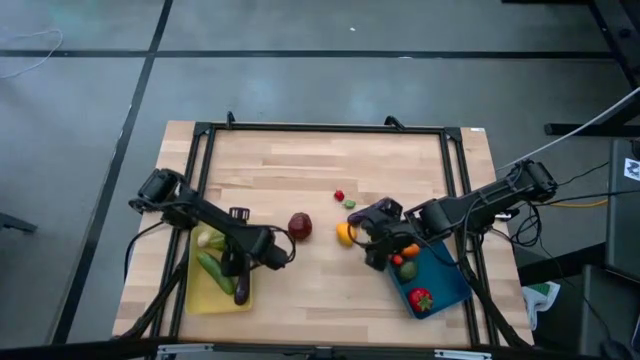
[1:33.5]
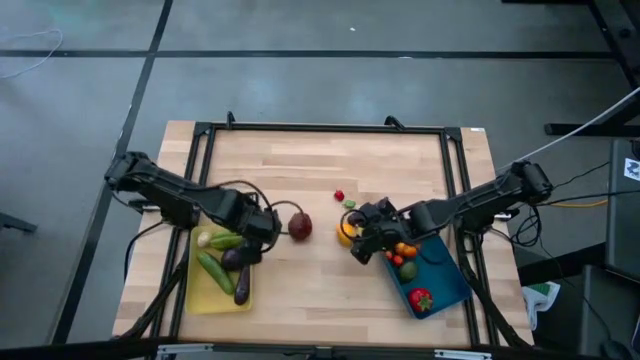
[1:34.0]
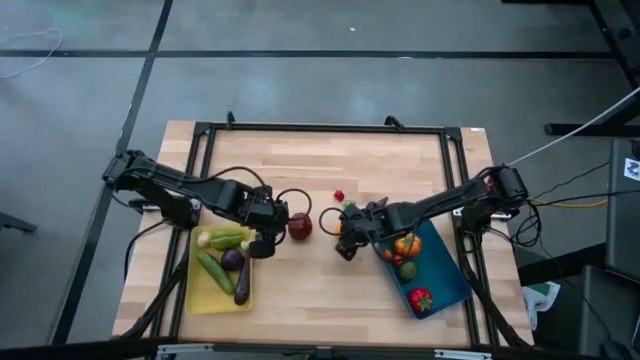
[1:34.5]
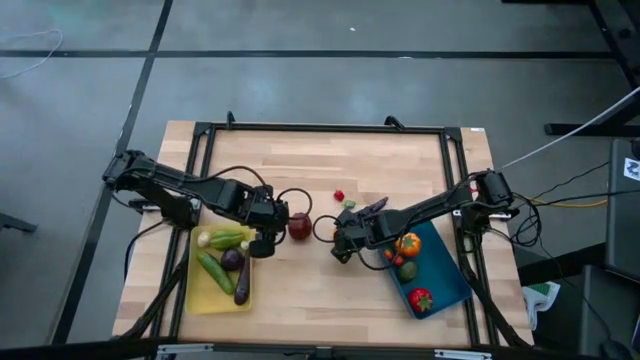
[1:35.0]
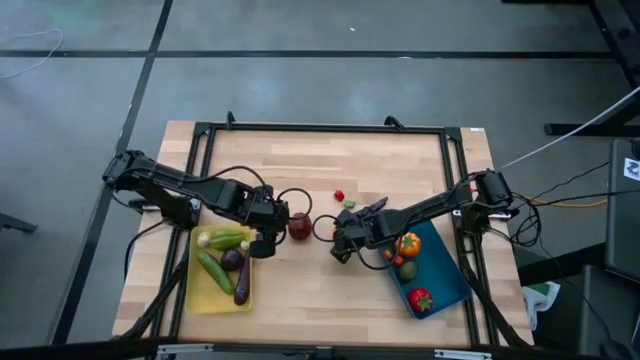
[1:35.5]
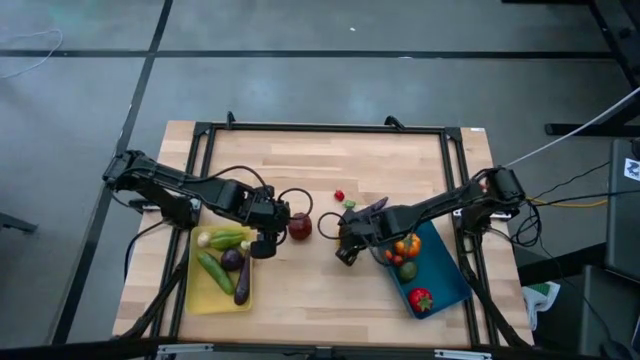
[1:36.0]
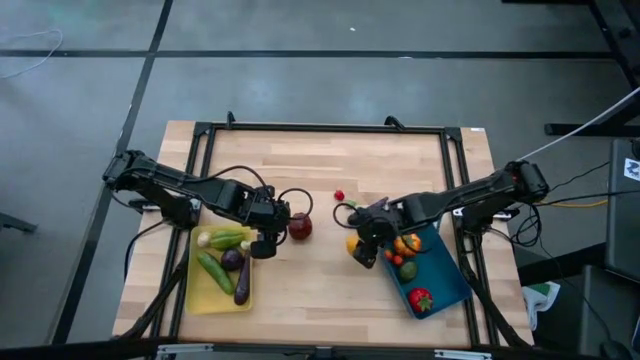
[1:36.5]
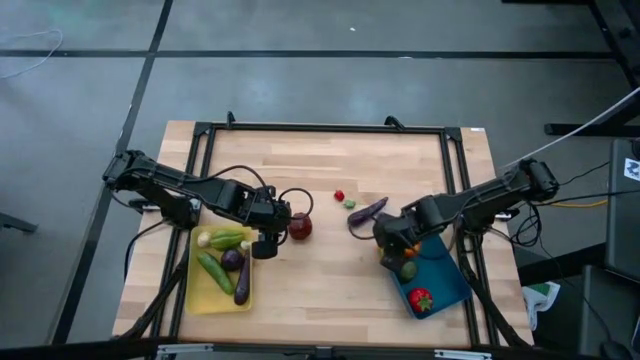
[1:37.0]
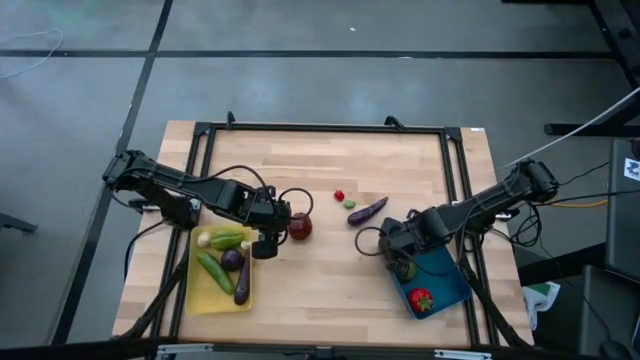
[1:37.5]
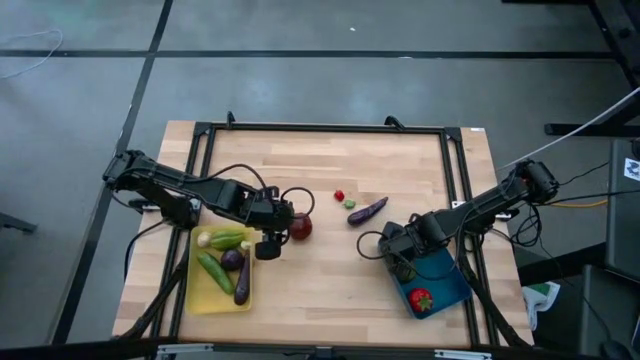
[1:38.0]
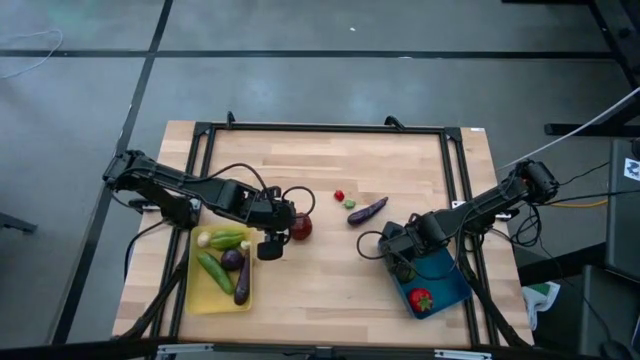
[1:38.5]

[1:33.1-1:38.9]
Task: Sort produce into baskets
Put the yellow lemon into the blue bin

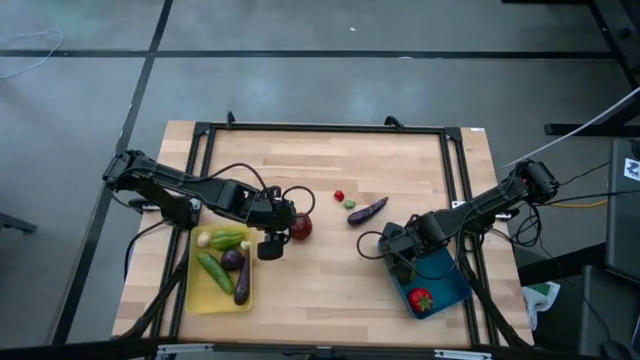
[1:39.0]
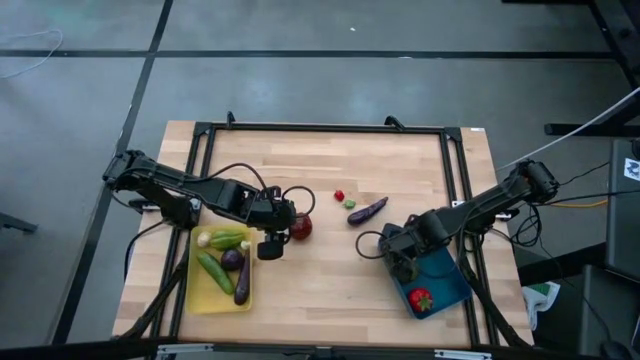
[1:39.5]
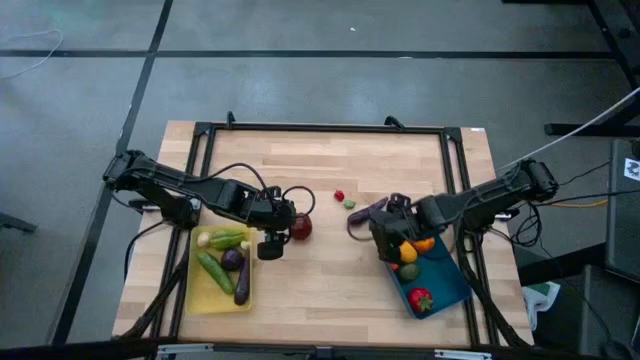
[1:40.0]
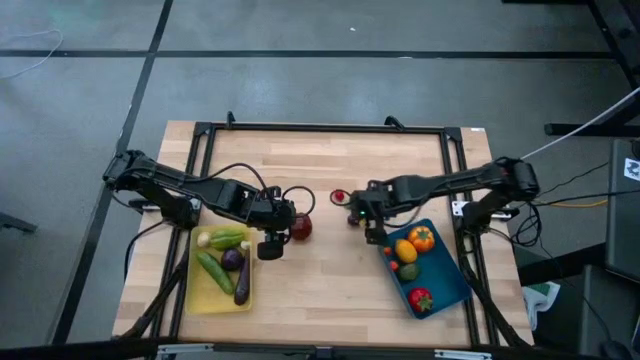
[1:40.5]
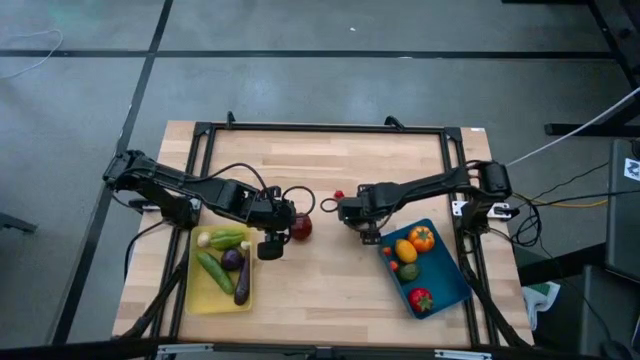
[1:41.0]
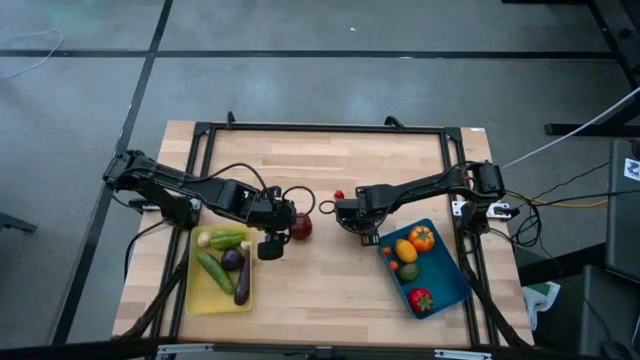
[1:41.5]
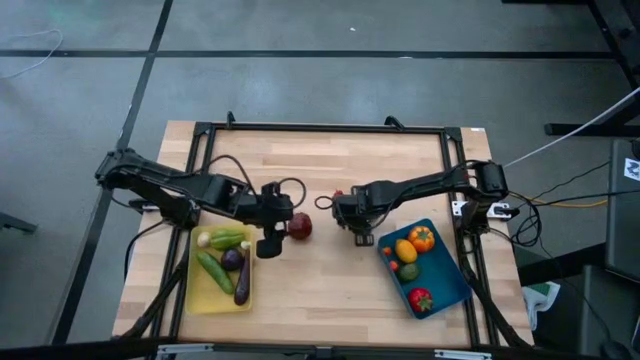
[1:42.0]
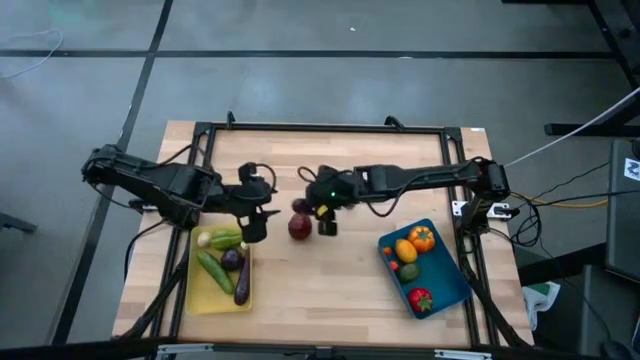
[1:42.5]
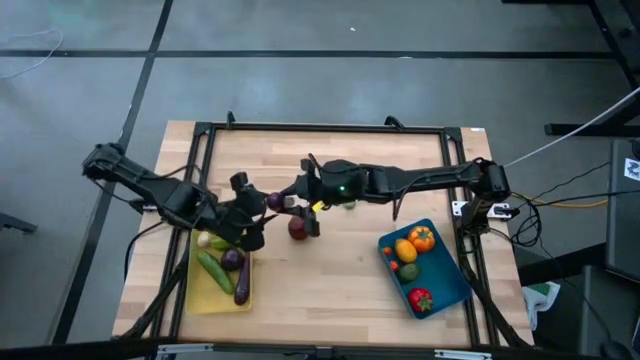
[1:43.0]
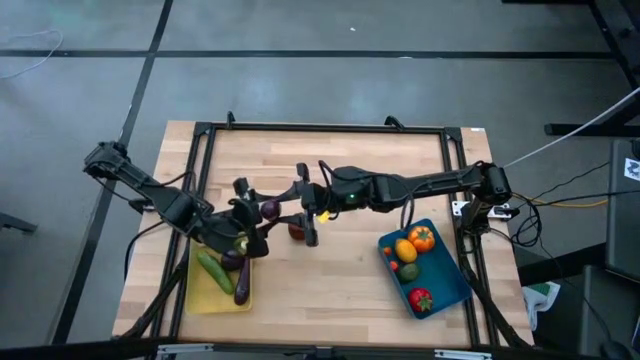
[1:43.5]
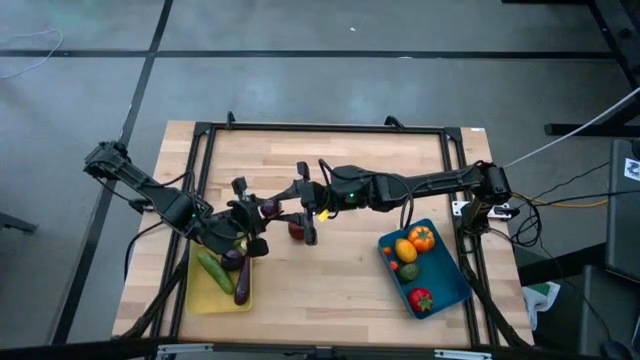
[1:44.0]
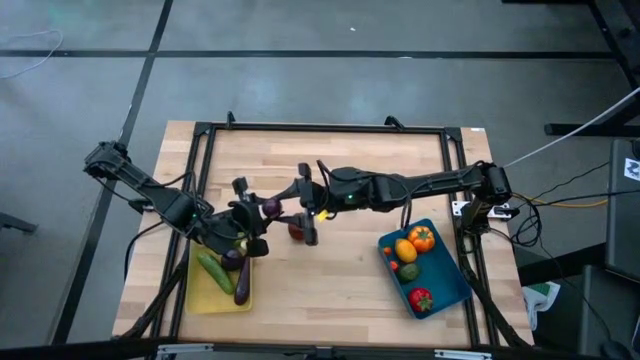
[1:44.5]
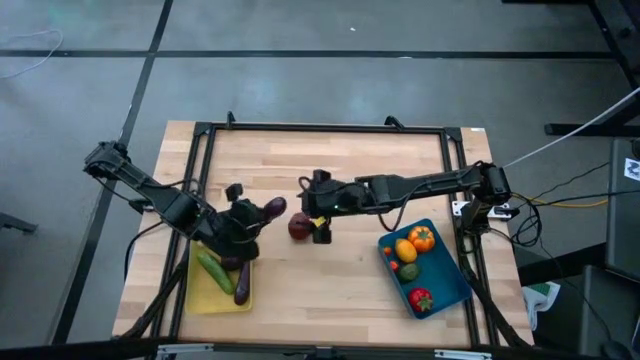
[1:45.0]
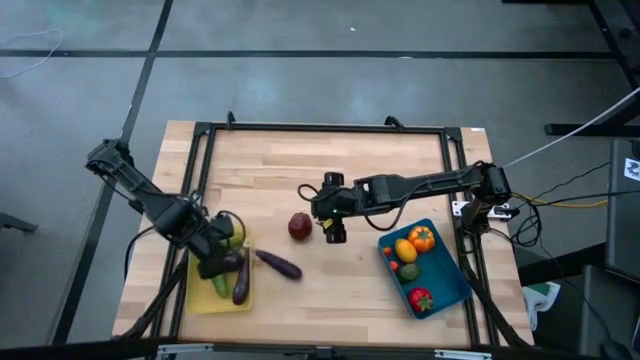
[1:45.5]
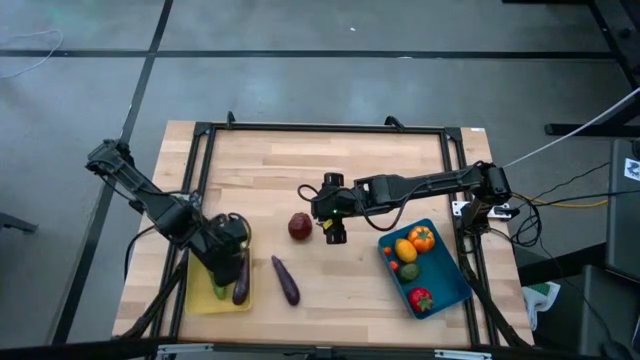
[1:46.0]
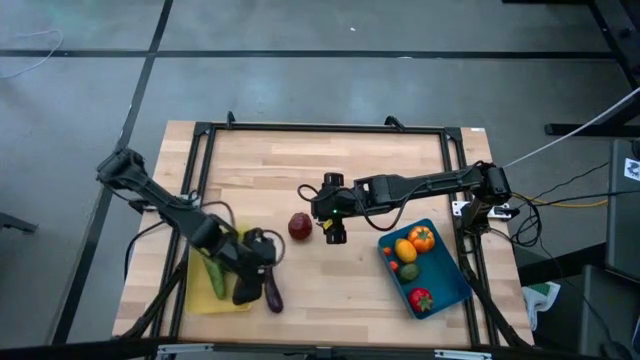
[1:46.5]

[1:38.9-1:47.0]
Put the eggplant into the yellow bin

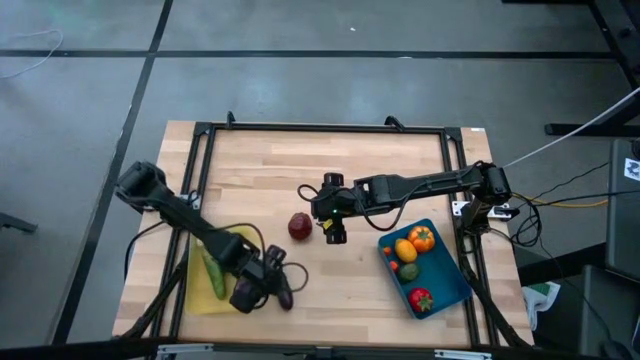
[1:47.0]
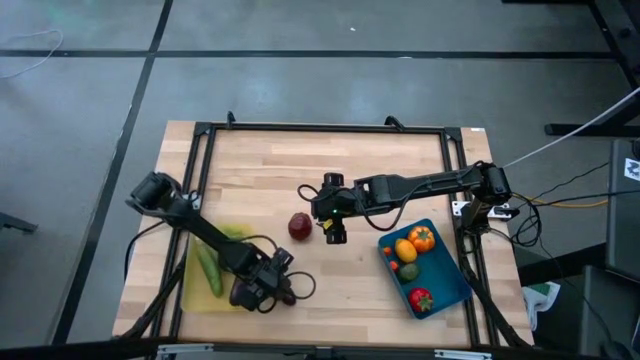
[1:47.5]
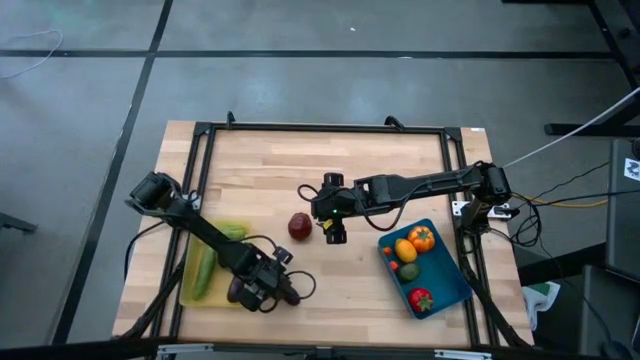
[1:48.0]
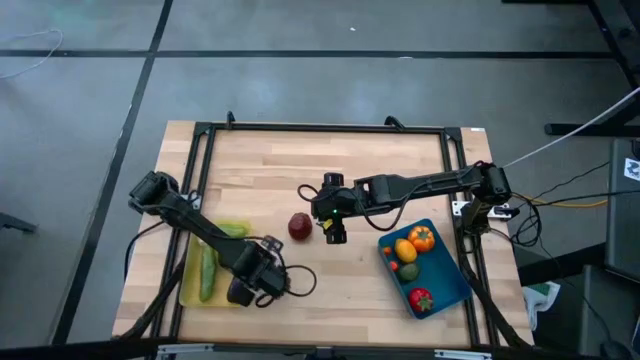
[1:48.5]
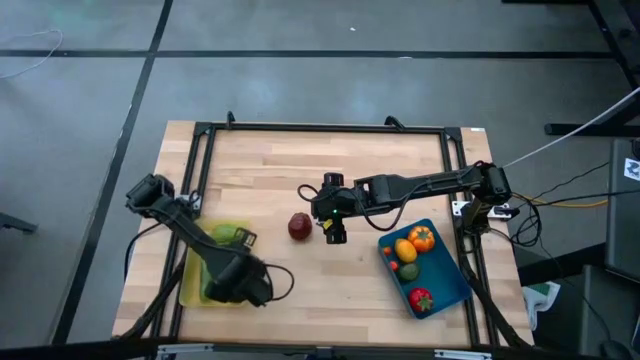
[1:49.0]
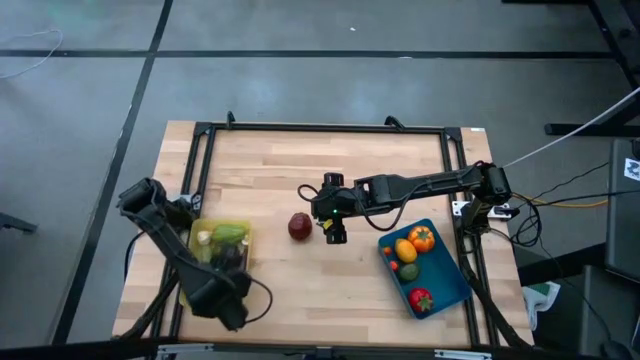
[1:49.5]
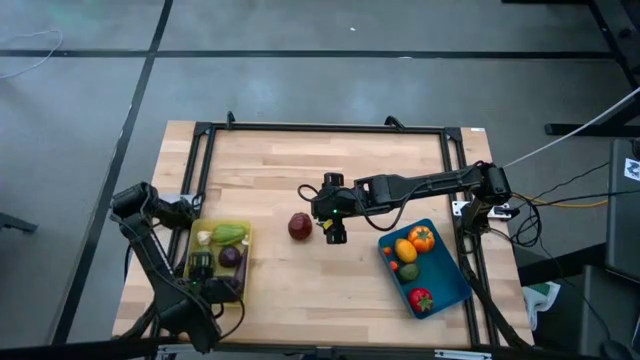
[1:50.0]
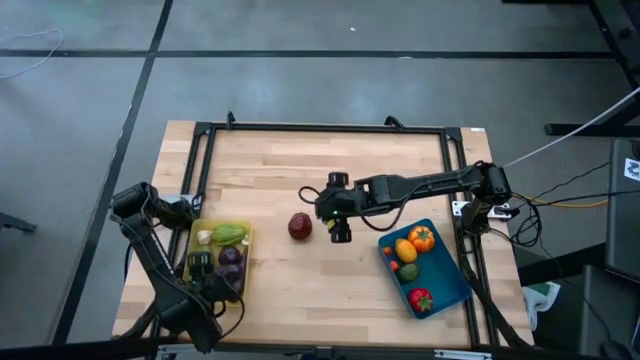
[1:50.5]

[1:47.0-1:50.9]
Put the eggplant into the yellow bin

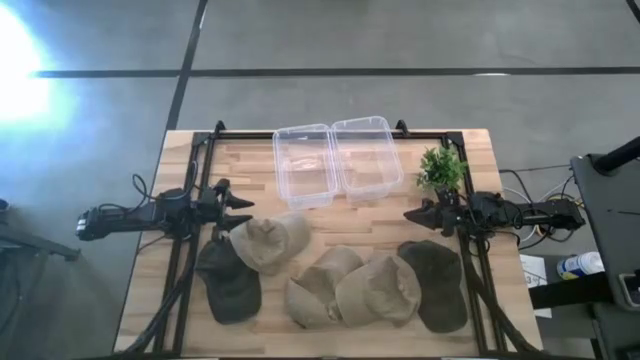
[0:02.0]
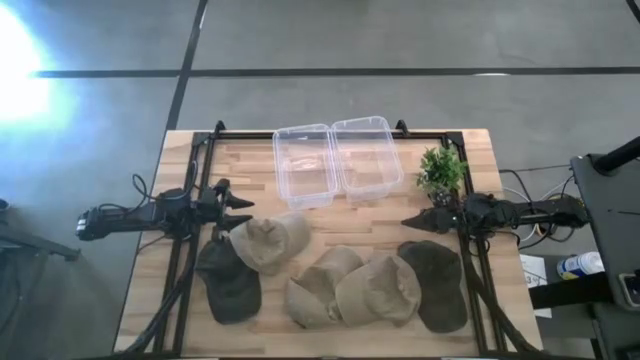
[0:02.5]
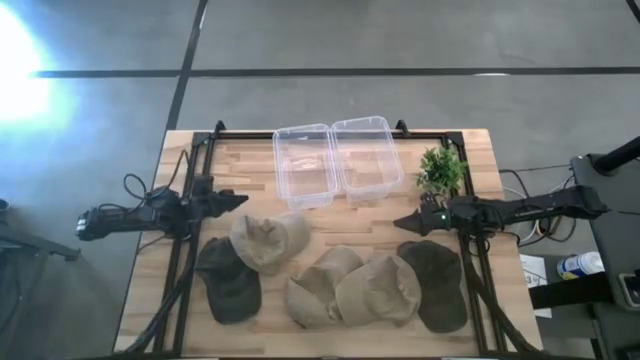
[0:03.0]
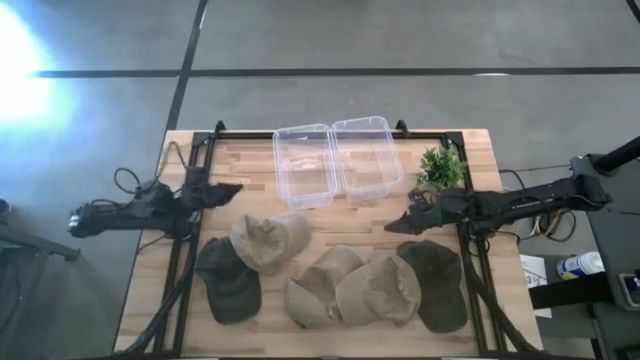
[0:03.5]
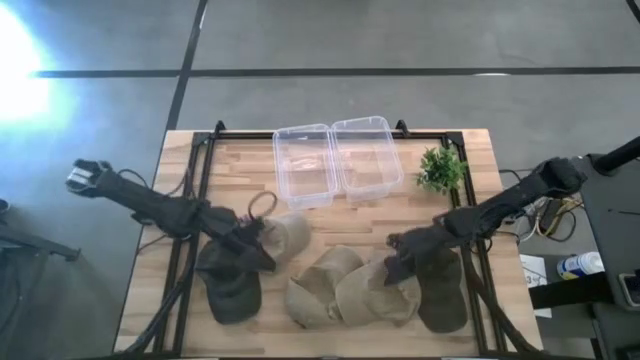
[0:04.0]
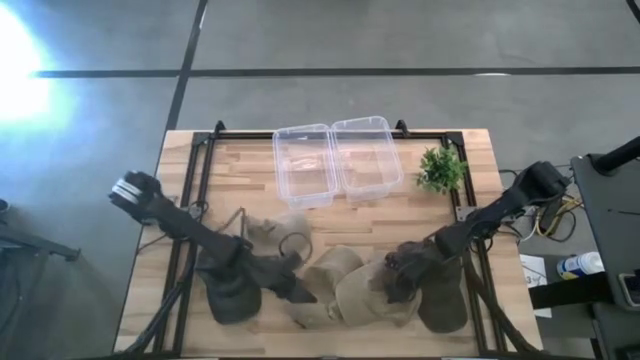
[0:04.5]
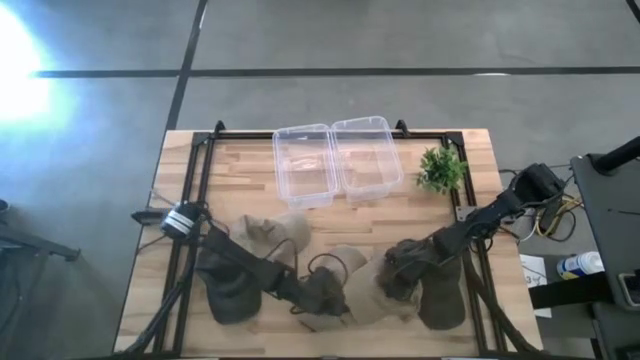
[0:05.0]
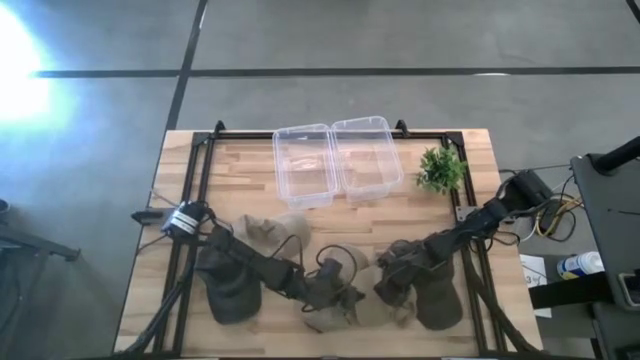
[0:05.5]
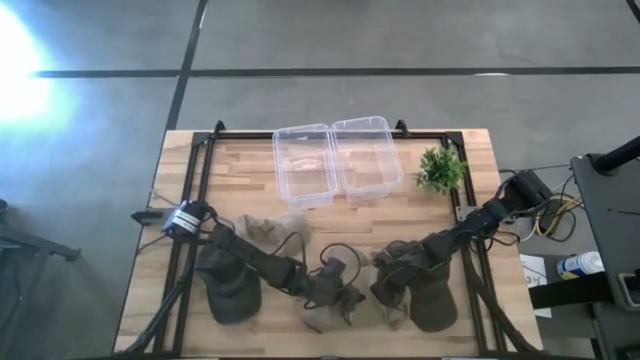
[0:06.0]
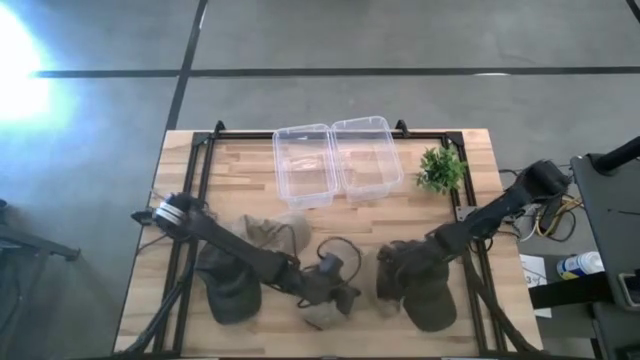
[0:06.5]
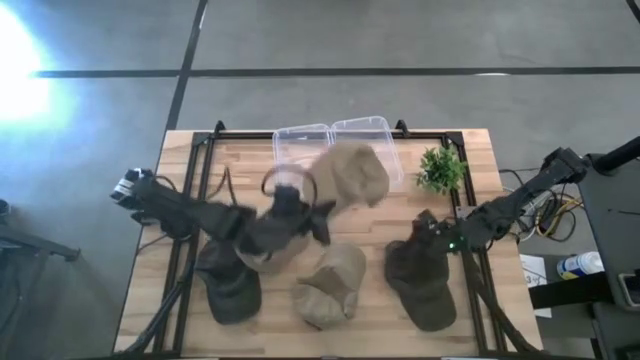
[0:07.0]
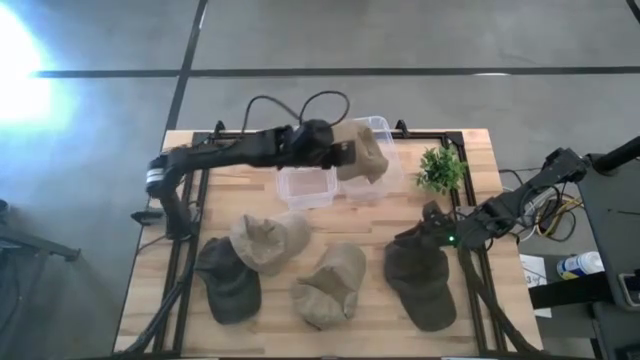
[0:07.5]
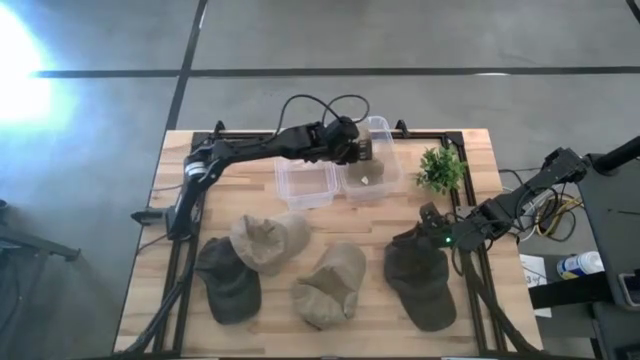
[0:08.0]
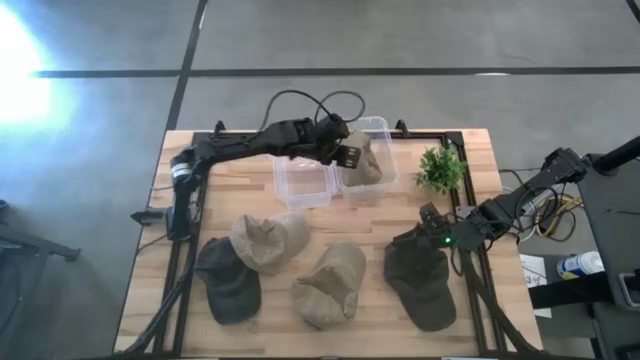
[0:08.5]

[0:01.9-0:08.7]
Task: Pick and place caps into container
Put the right brown cap into the right transparent container
